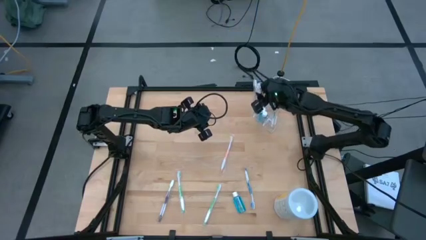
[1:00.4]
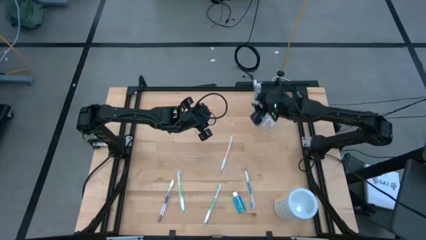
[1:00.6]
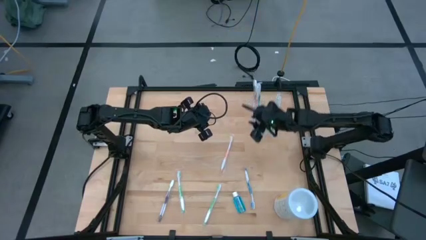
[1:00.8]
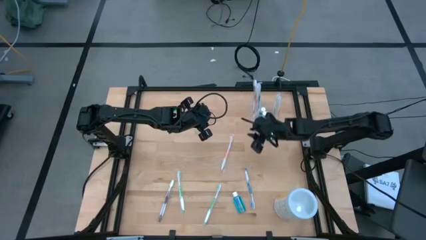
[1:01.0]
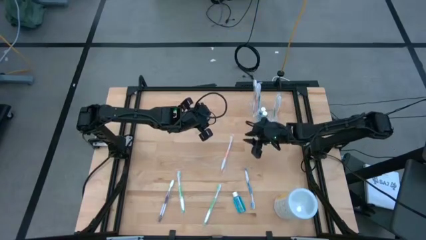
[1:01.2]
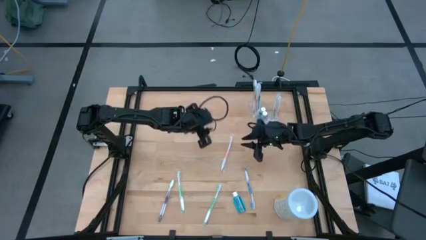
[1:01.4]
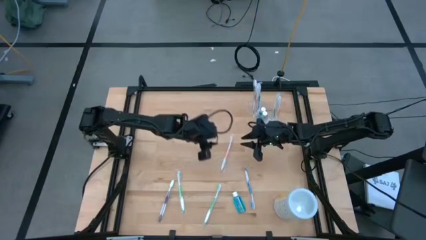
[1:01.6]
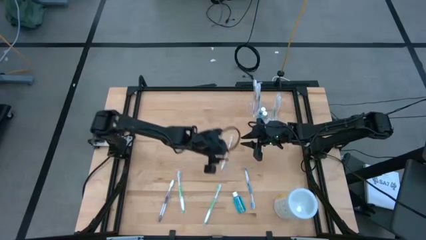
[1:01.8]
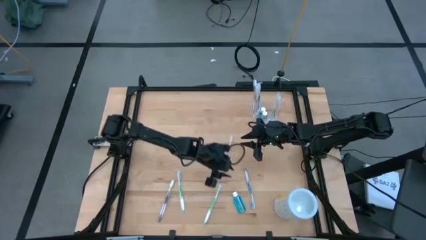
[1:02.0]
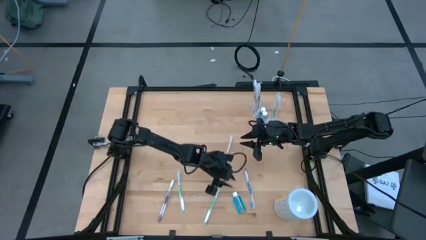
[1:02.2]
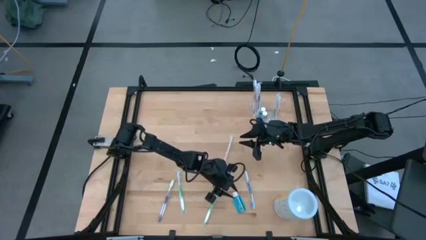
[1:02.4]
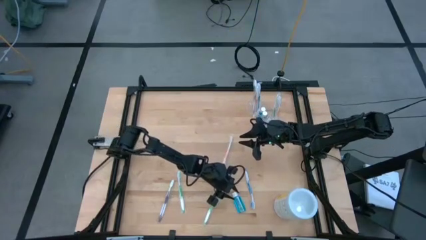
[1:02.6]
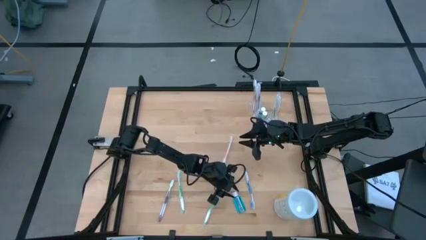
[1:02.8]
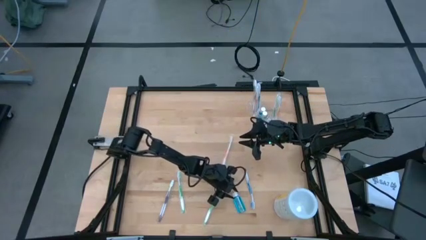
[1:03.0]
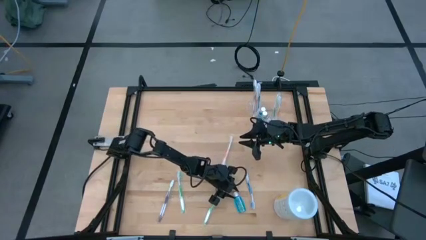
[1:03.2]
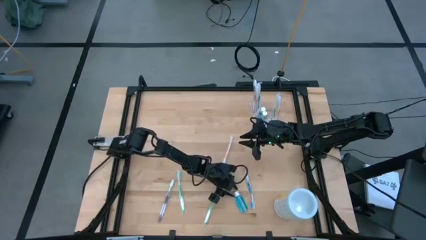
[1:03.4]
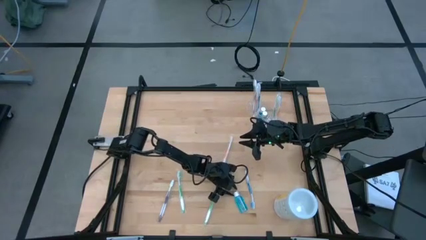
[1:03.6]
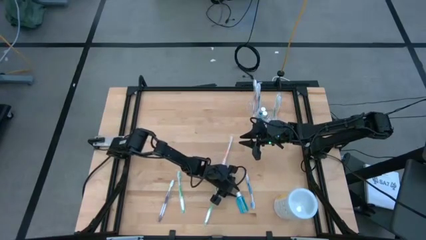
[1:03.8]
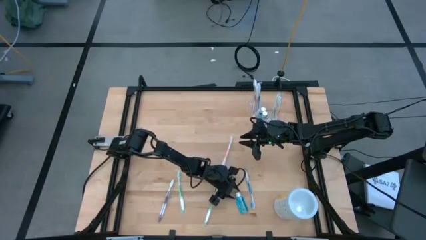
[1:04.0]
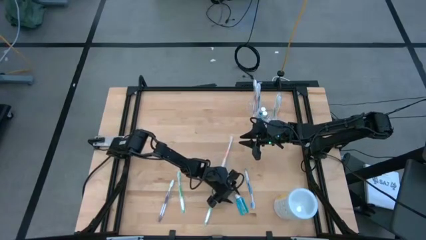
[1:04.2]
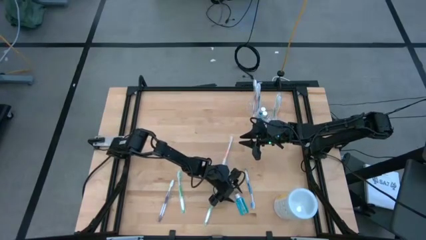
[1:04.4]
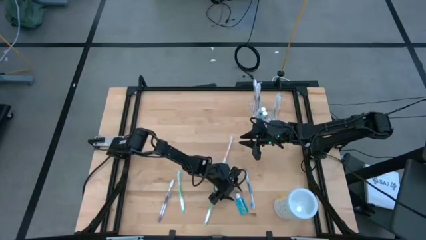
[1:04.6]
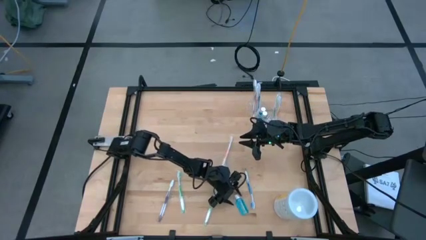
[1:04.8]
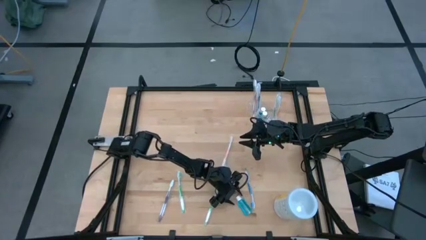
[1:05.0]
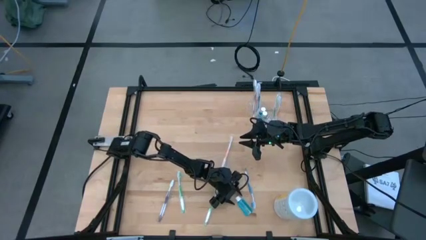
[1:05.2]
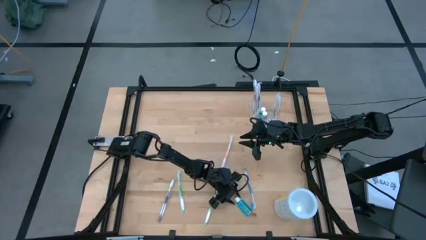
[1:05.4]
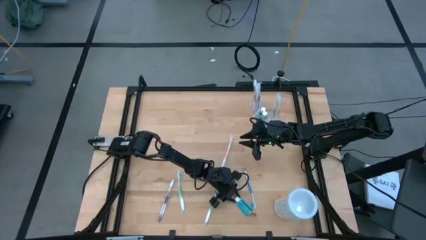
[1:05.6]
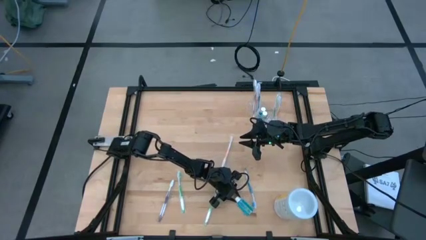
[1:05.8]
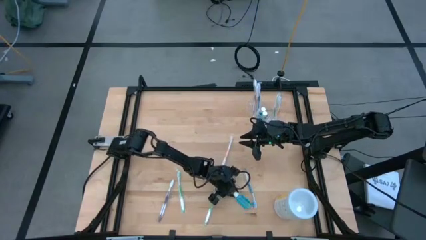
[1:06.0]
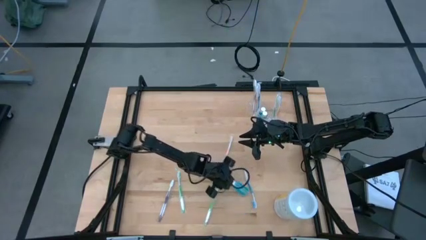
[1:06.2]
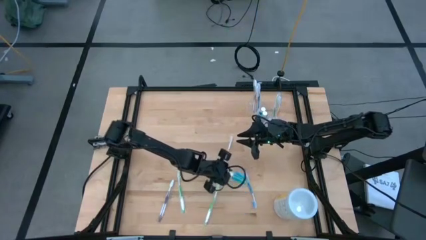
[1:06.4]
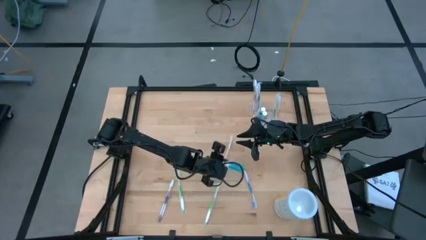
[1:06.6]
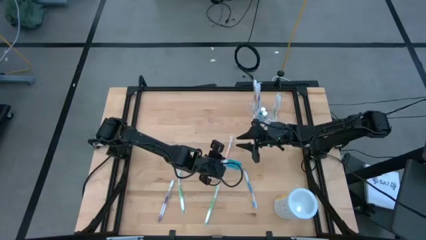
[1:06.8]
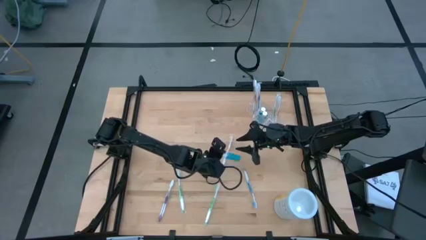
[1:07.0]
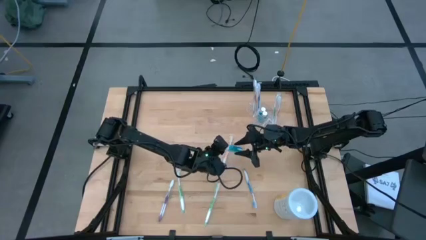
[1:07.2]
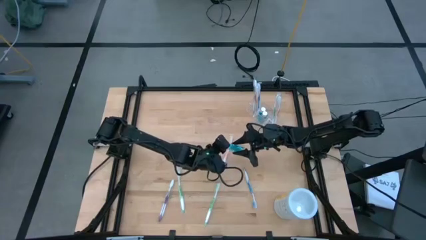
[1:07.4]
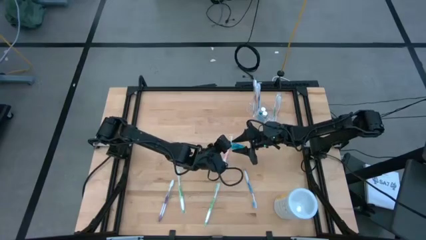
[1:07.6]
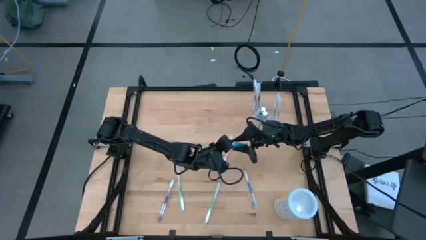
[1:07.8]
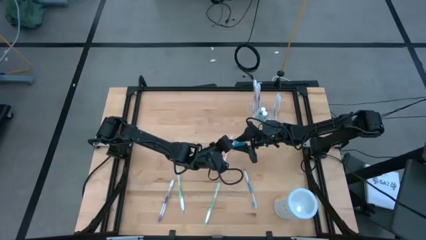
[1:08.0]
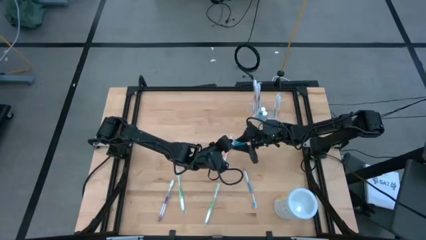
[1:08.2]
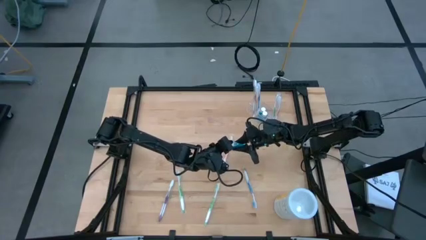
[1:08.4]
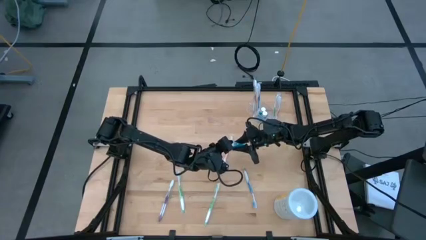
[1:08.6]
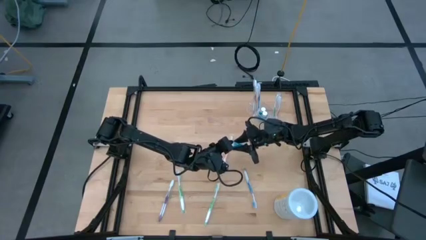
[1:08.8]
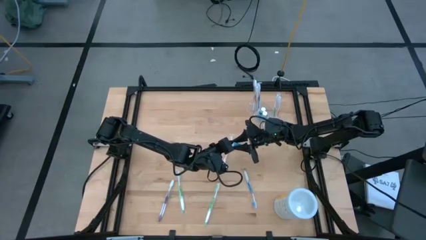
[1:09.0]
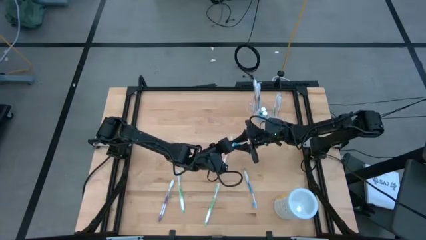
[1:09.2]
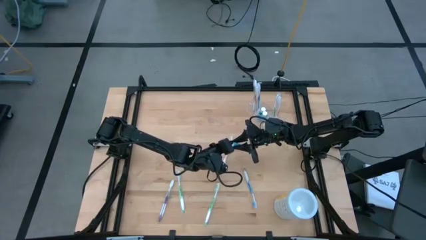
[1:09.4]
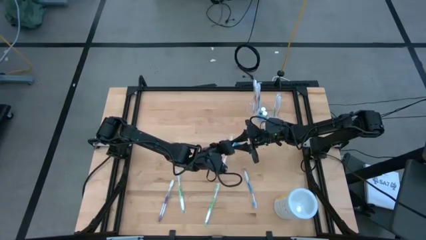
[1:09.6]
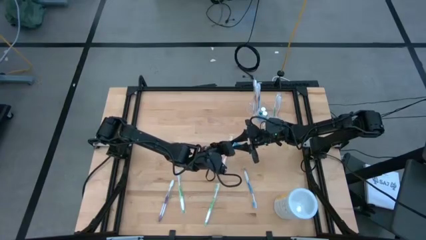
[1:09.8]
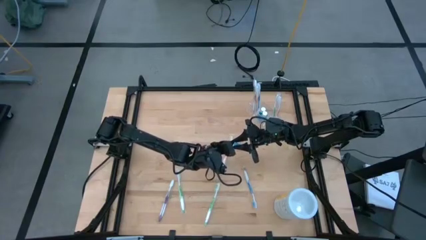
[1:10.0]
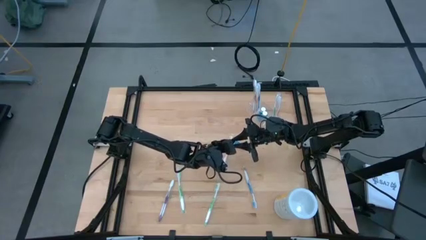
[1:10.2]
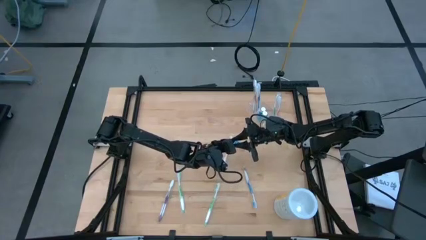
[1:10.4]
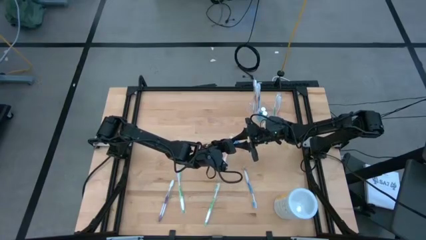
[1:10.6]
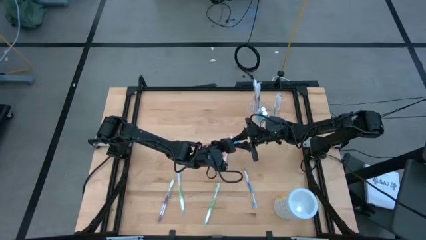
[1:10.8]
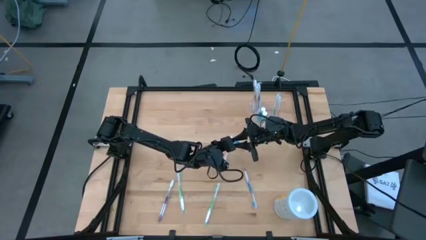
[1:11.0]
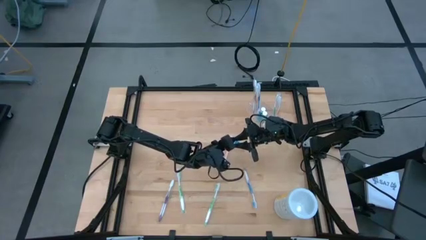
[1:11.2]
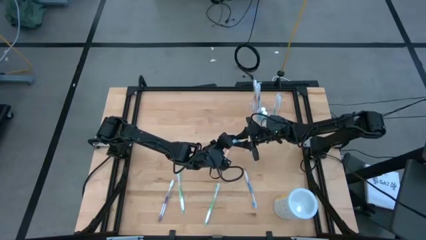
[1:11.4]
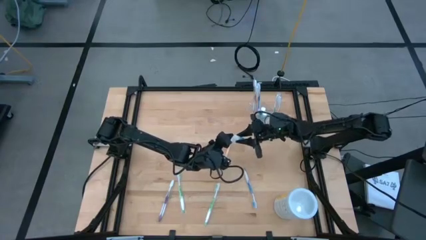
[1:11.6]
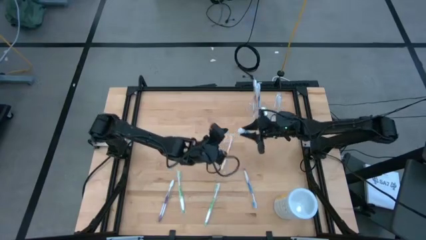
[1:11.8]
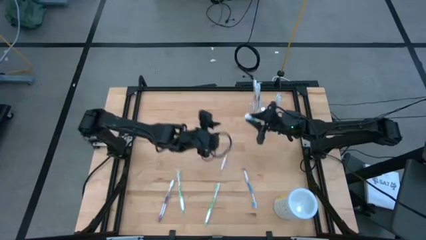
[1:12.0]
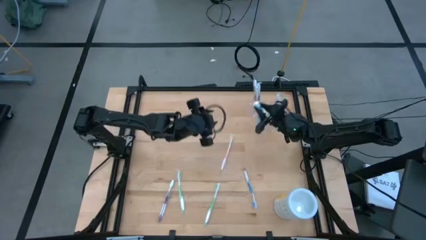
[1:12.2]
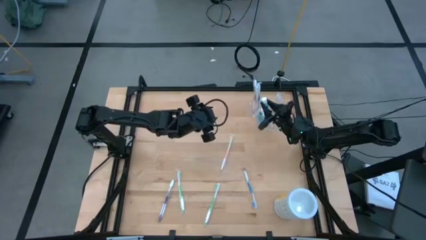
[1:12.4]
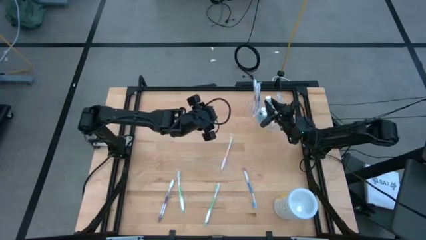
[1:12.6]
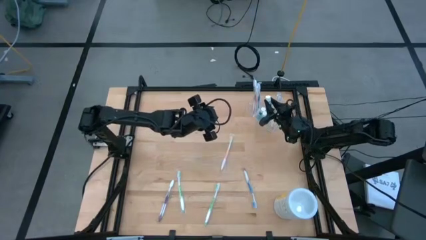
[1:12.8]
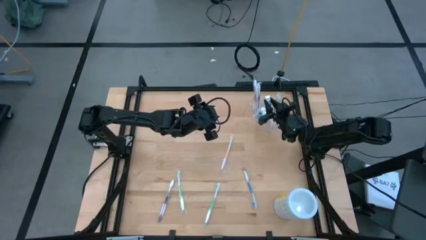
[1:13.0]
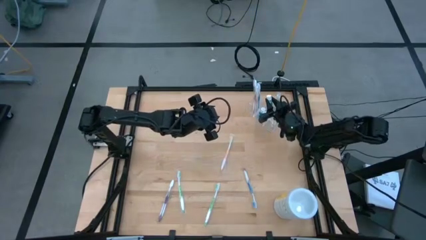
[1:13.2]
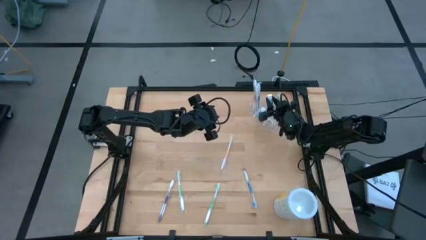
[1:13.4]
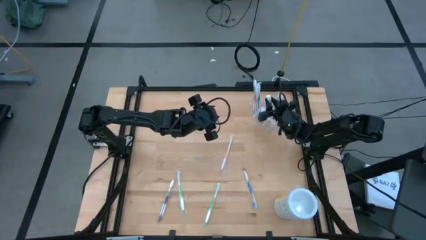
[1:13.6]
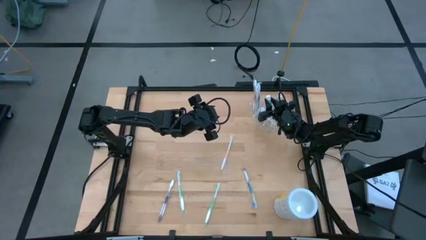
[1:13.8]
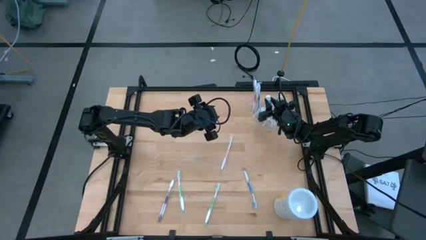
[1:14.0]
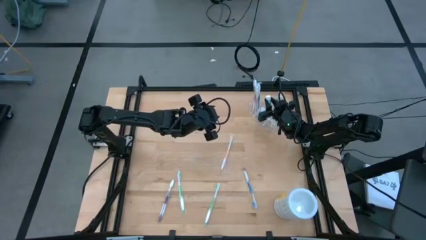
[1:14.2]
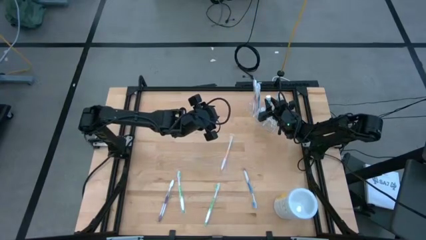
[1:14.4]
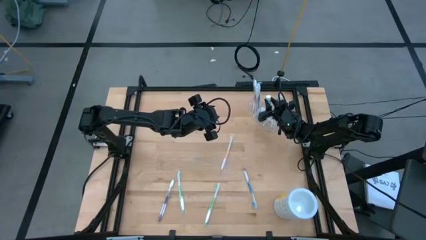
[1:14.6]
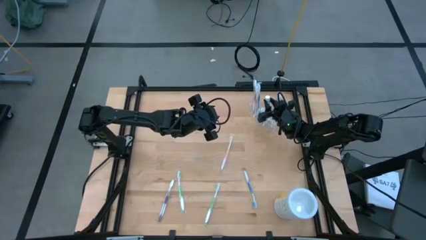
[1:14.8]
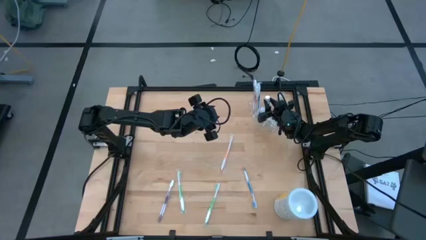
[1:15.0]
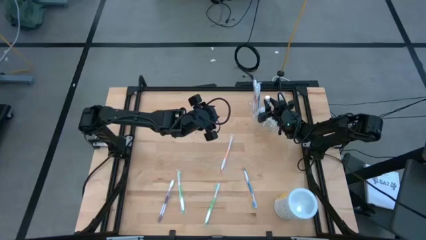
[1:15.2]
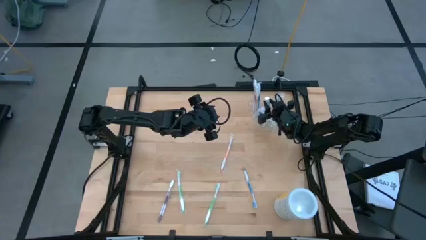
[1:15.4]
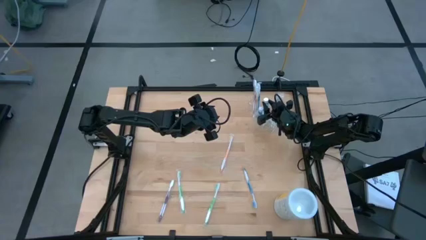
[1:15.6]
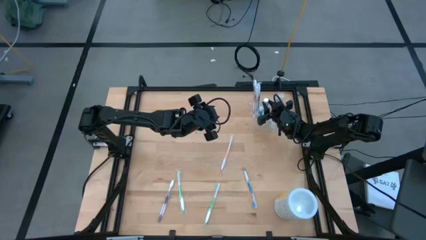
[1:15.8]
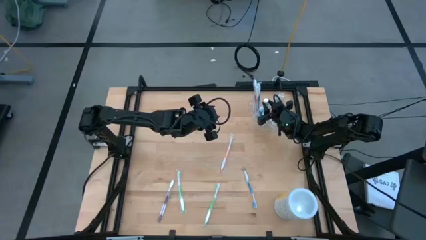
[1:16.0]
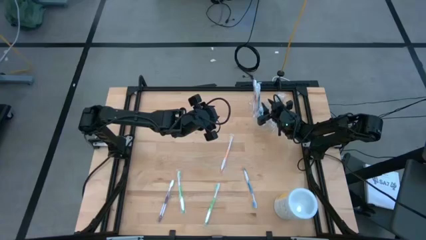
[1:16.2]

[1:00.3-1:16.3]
Task: Pick & Place toothbrushing station
Put the blue mouthwash into the transparent organizer
